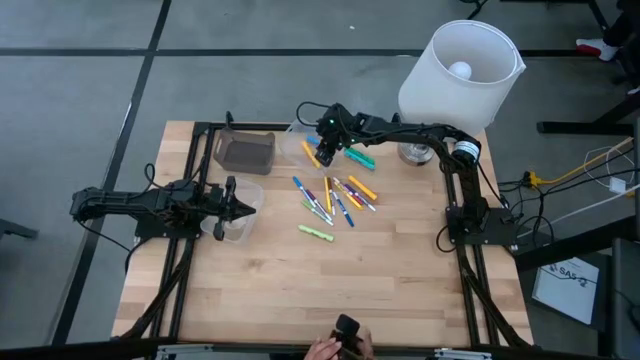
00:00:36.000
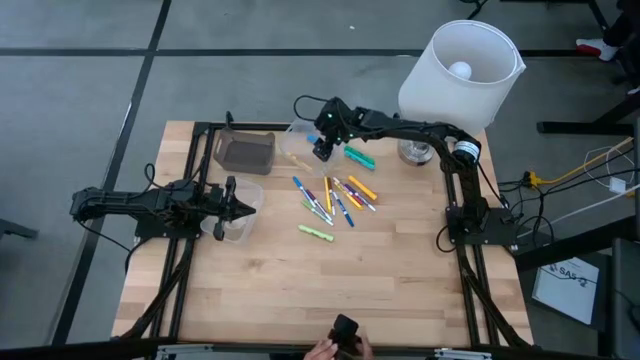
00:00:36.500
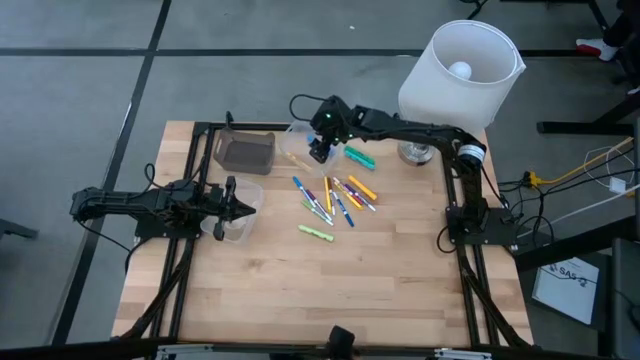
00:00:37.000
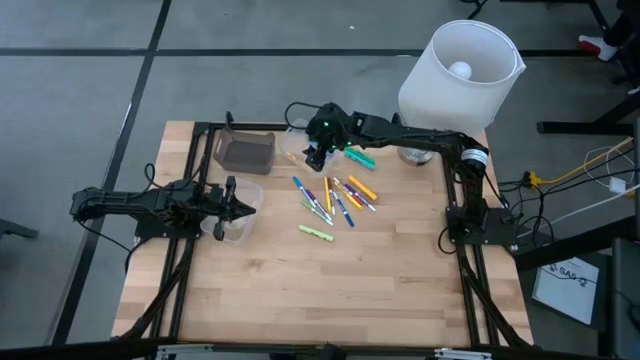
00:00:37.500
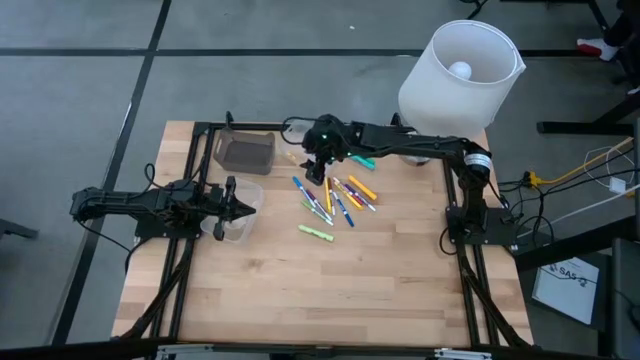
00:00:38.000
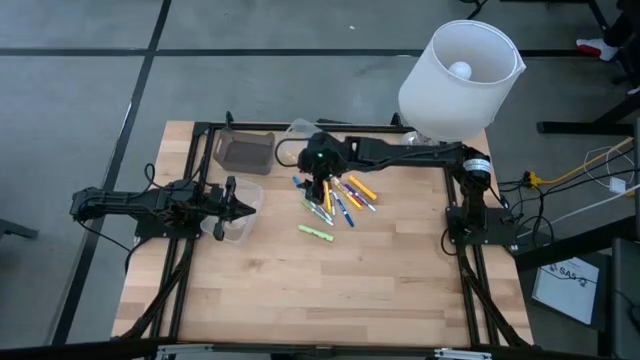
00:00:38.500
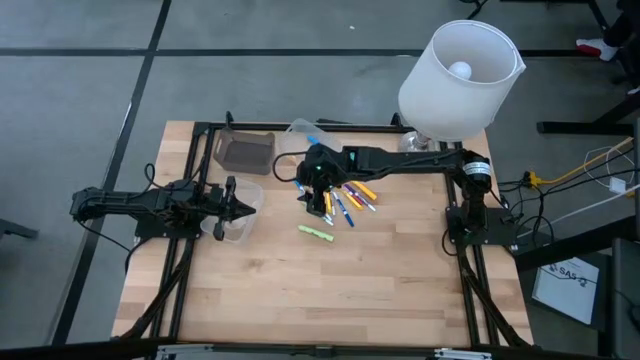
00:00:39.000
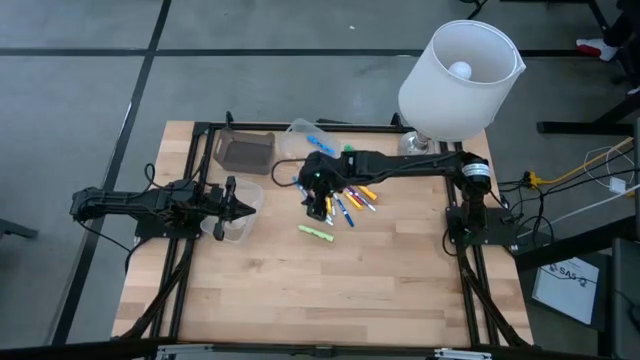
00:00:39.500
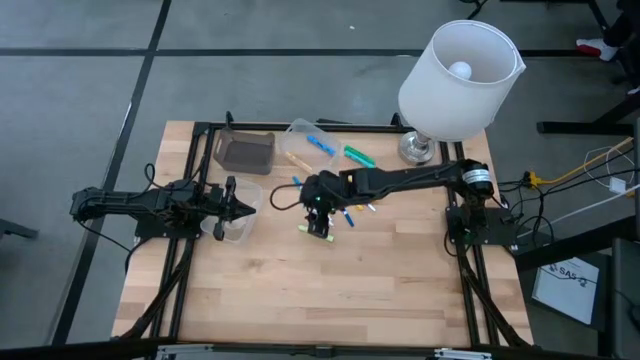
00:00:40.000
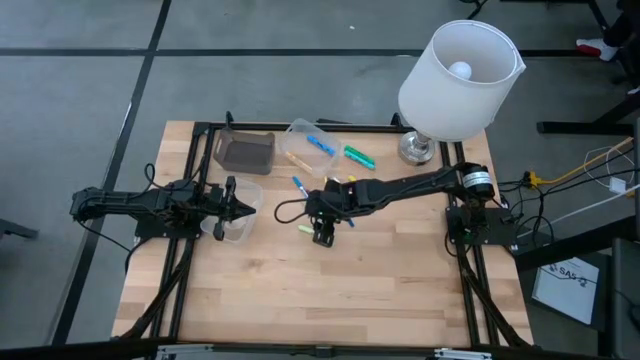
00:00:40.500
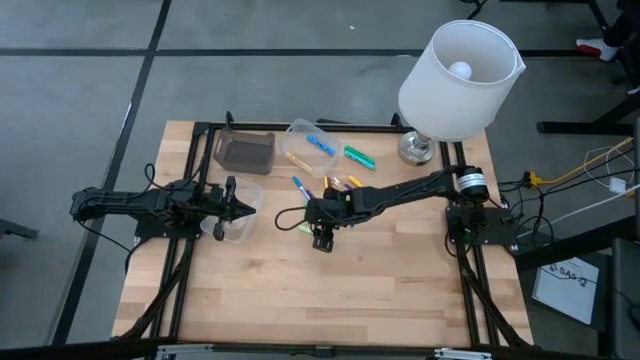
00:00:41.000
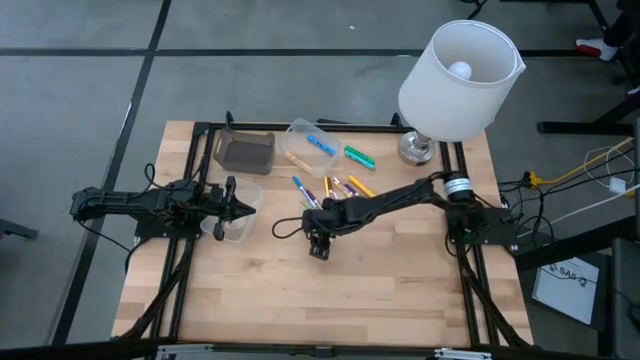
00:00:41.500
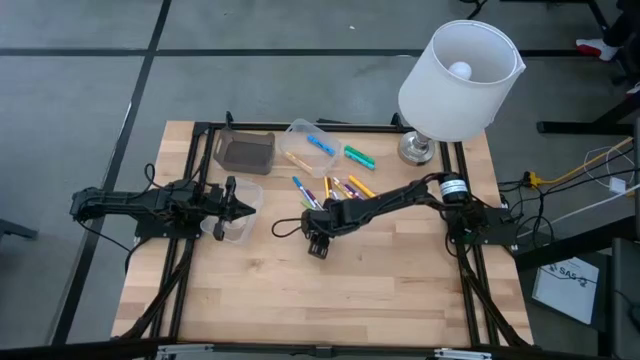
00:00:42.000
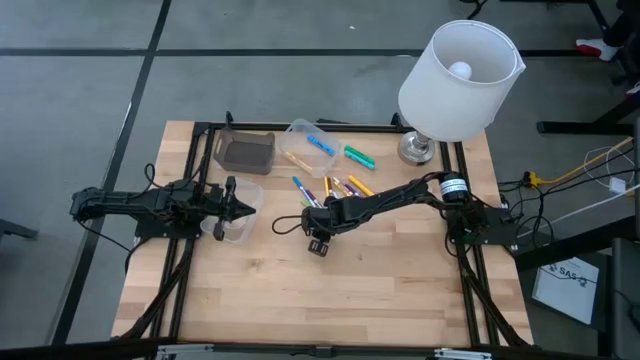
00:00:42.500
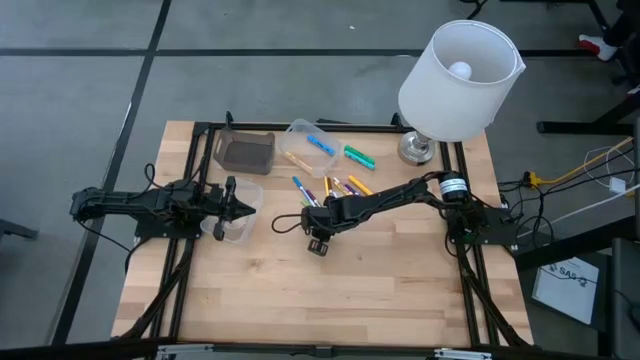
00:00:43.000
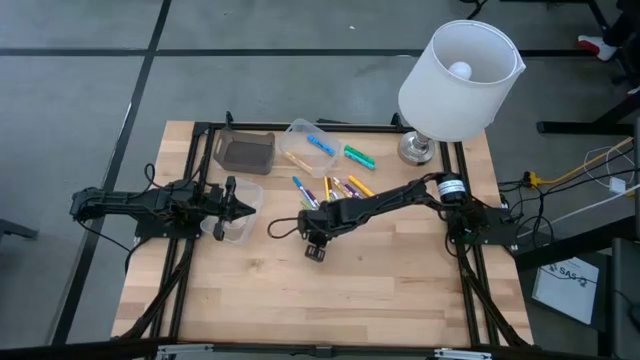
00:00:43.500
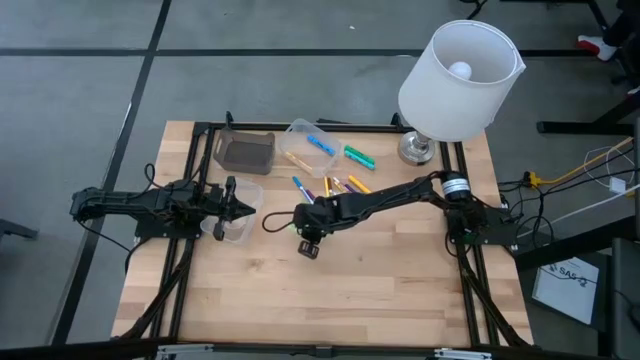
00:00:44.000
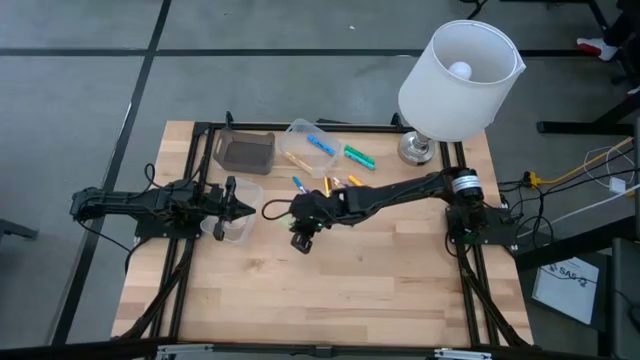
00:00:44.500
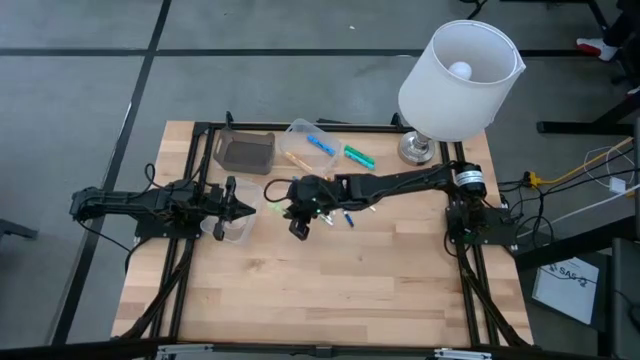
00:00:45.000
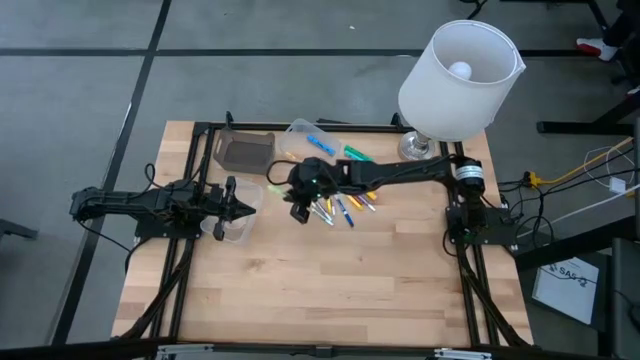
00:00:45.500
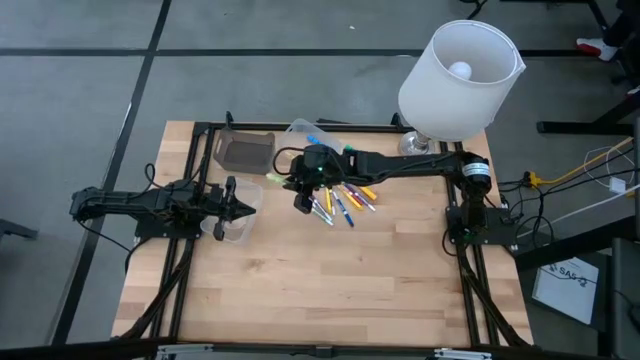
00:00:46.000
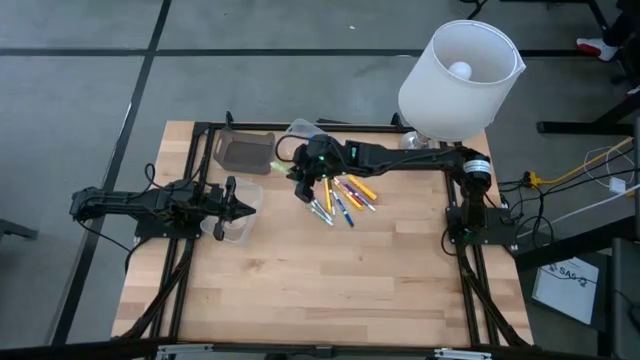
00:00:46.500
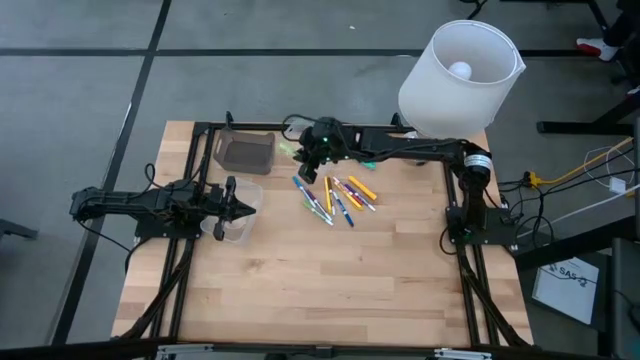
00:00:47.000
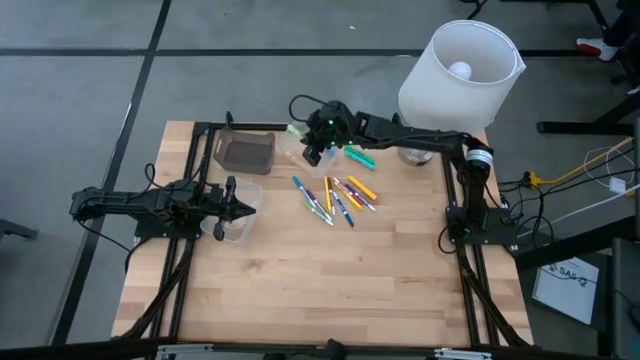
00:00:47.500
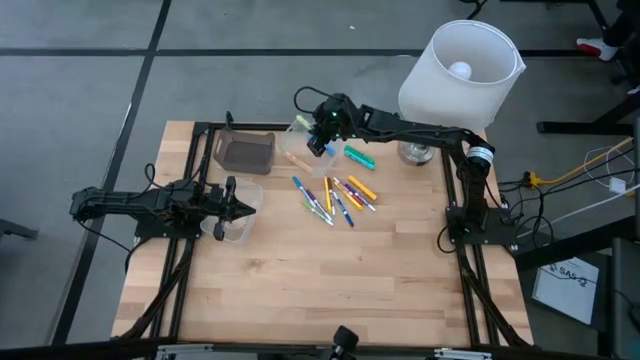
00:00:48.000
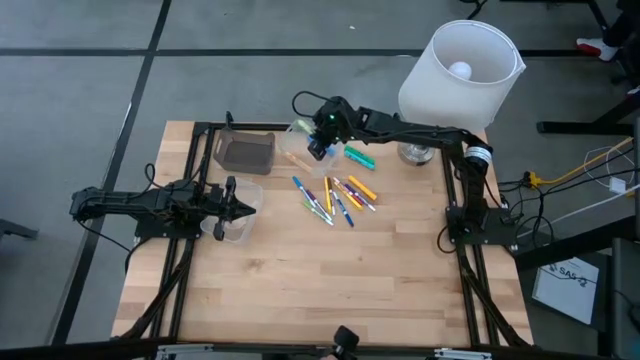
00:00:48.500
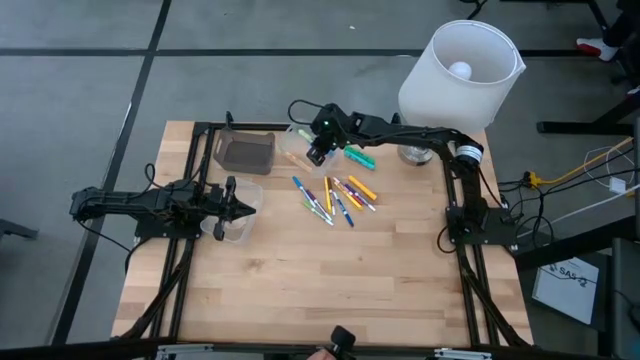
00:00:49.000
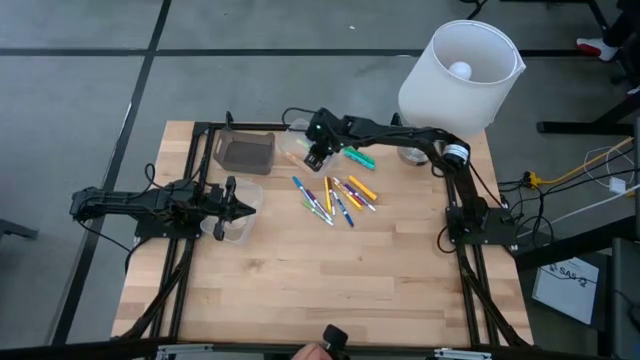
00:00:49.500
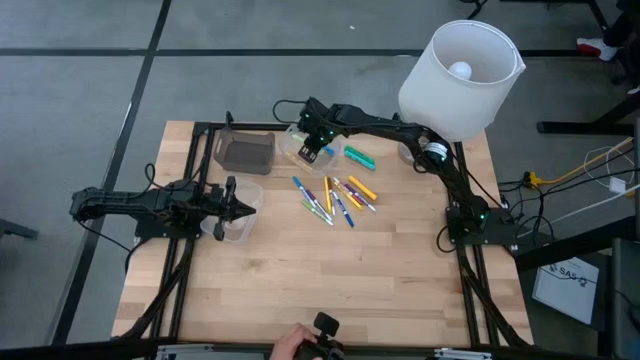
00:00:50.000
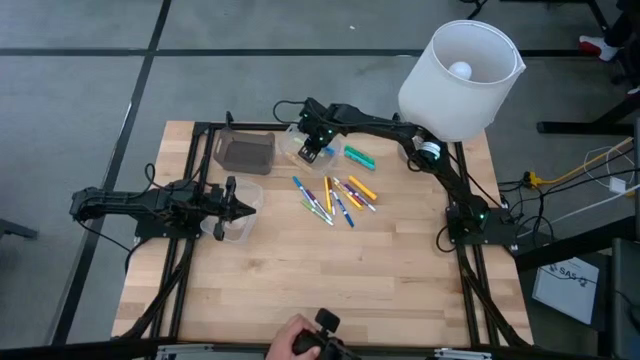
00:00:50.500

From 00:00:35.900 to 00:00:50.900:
Task: Pick & Place Markers
Put the light green highlighter into the top transparent bin

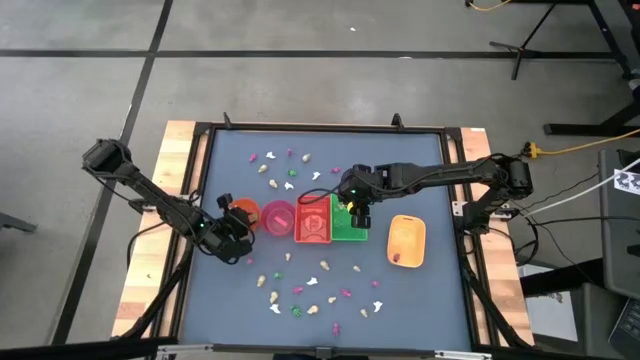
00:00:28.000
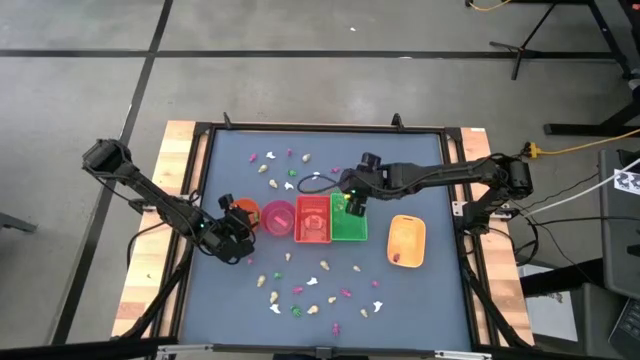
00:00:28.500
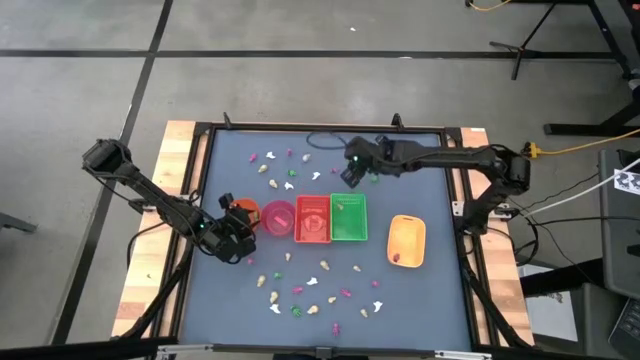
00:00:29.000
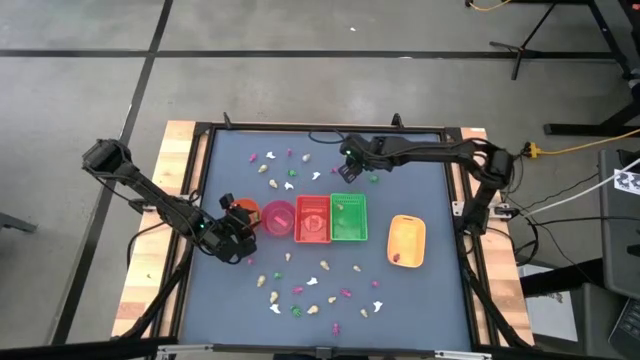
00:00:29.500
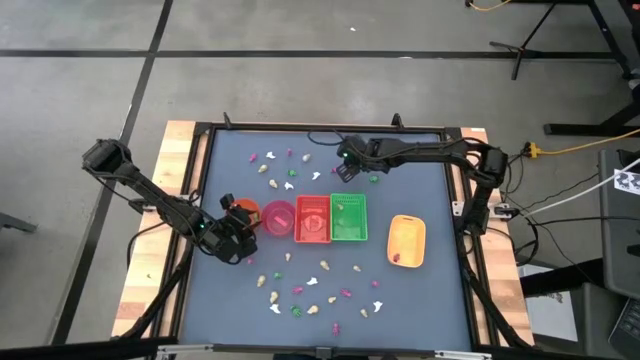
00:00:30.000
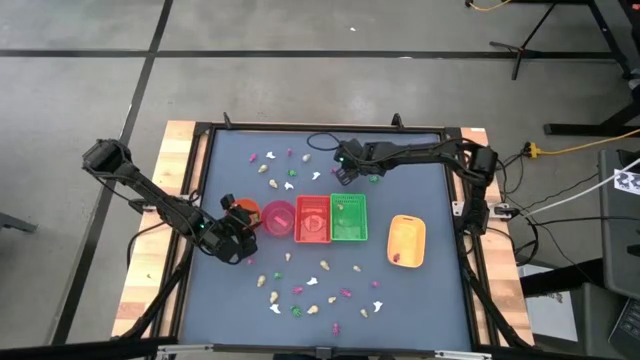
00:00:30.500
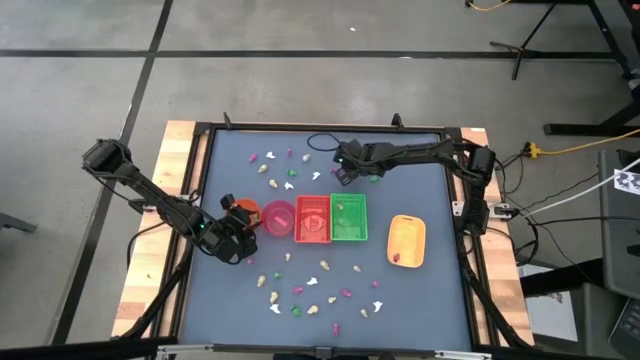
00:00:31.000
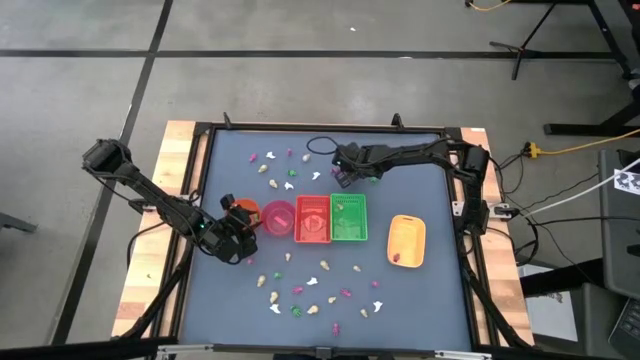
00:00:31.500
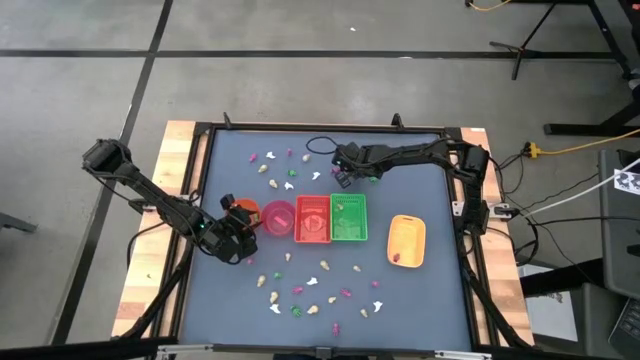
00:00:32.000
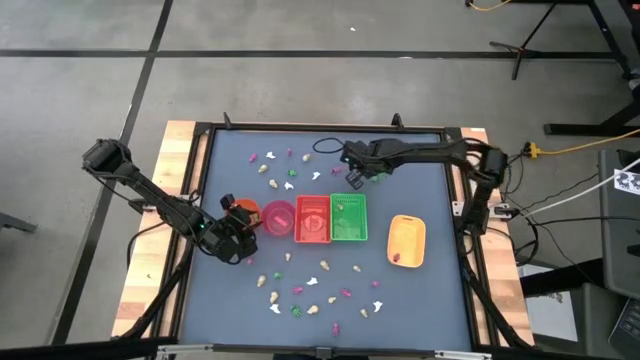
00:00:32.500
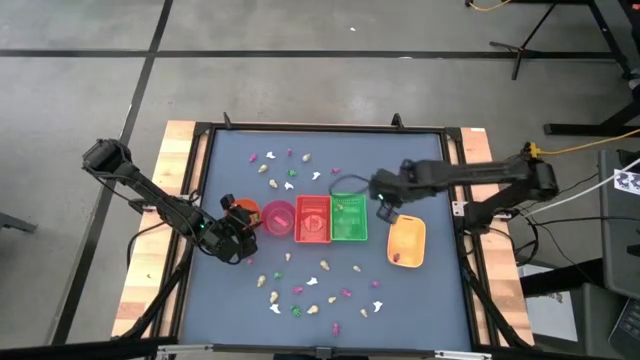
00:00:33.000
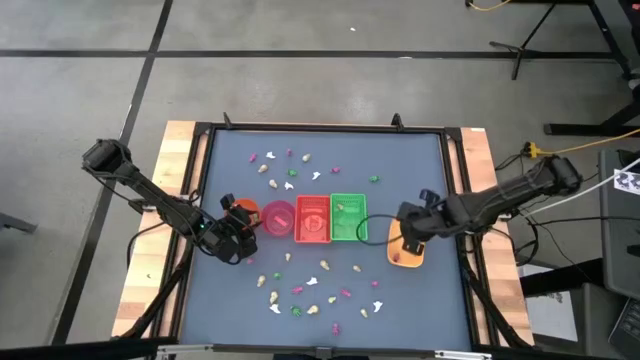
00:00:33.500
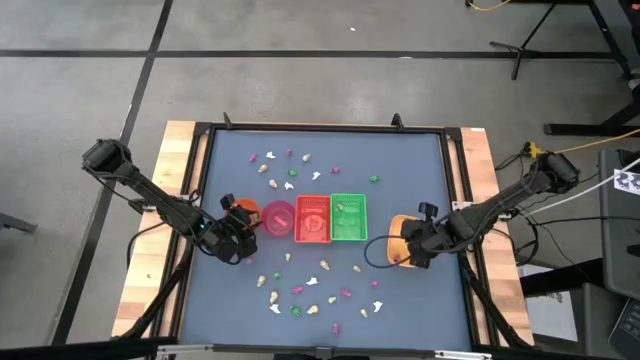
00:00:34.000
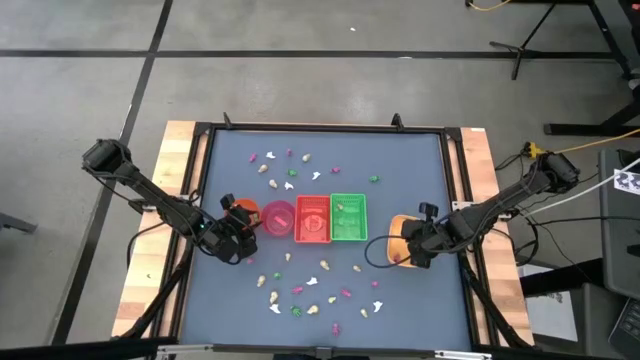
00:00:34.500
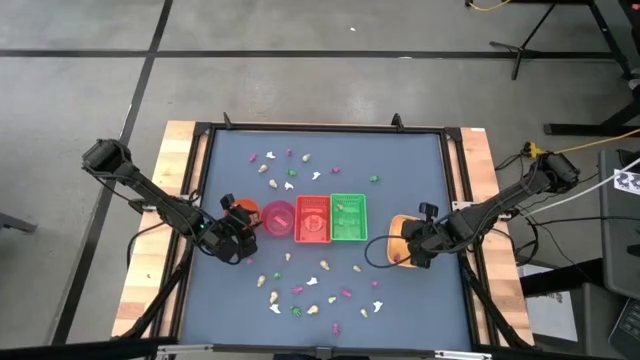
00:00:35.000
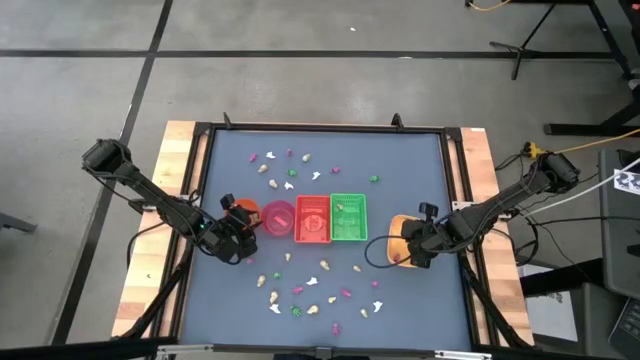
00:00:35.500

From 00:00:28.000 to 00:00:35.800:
Task: Sort Halloween decoration
Put the pink skeleton toy into the yellow bin
